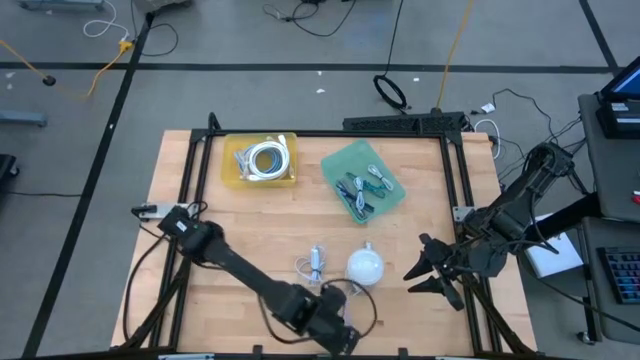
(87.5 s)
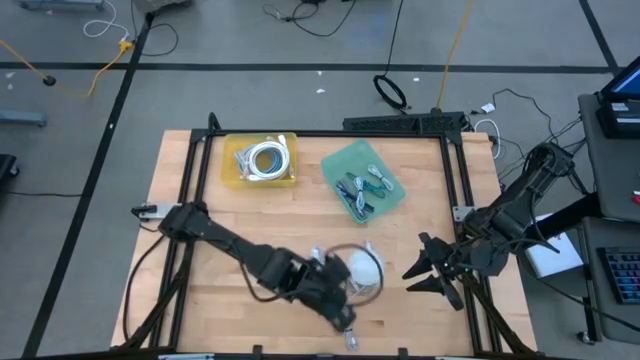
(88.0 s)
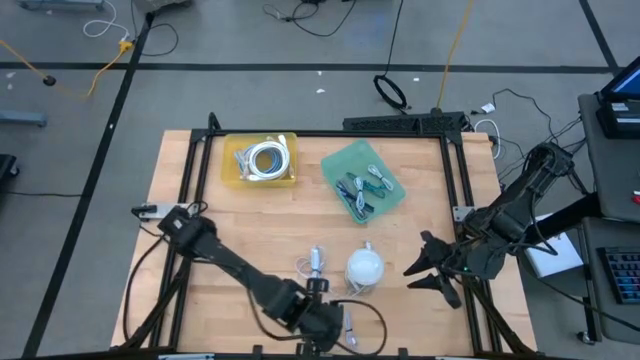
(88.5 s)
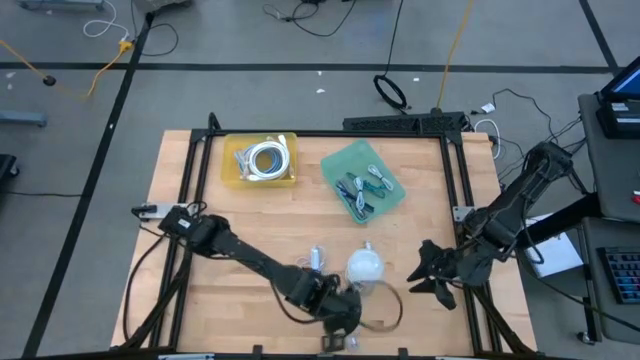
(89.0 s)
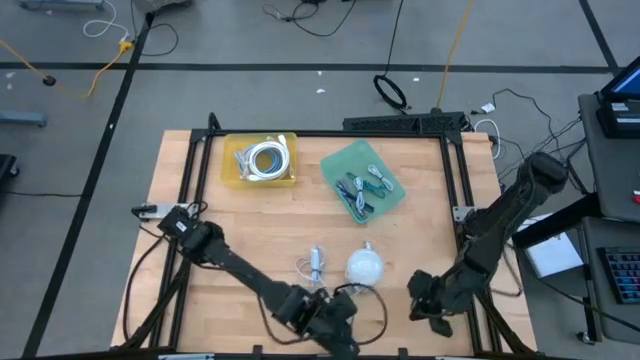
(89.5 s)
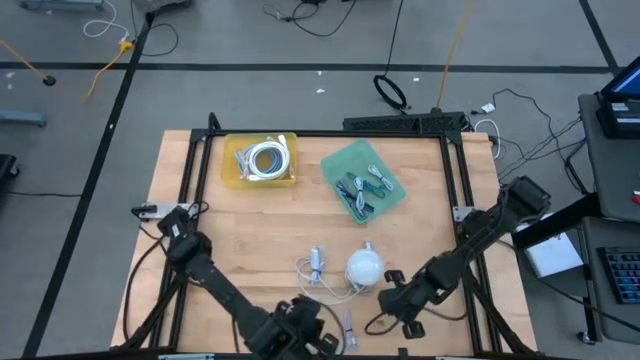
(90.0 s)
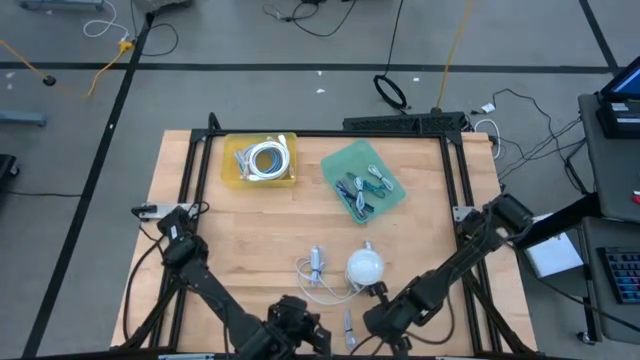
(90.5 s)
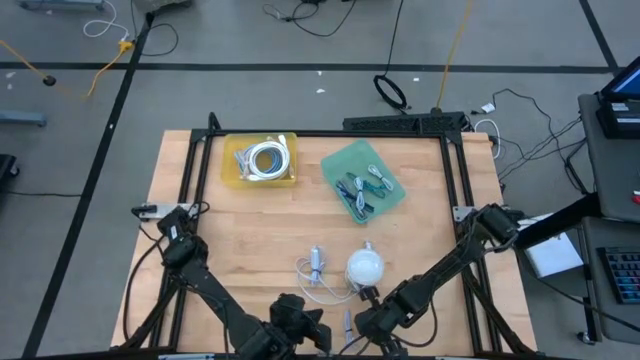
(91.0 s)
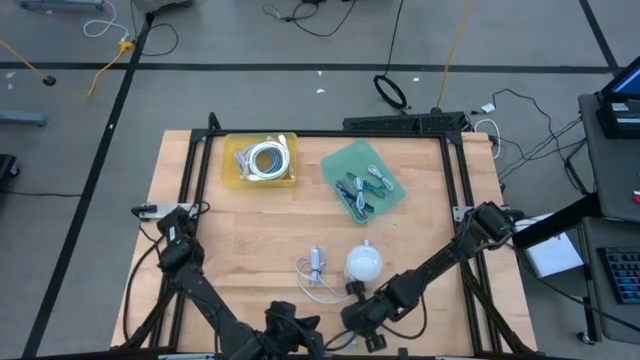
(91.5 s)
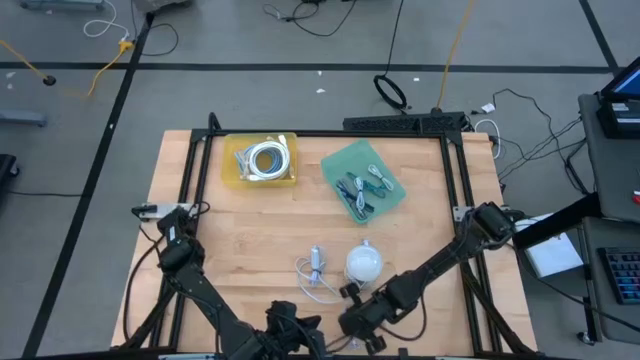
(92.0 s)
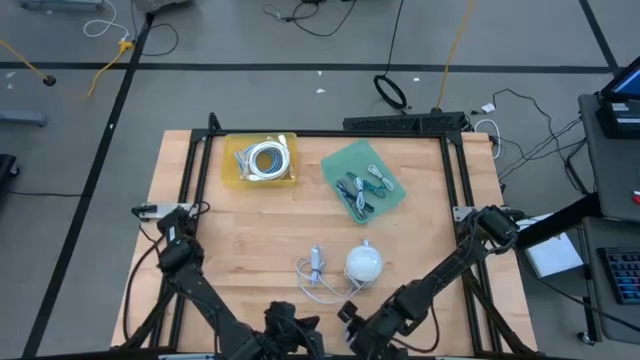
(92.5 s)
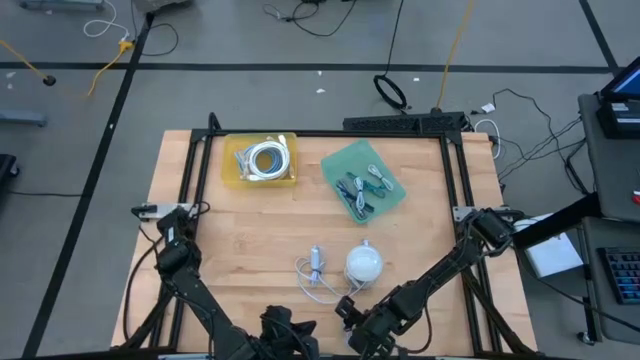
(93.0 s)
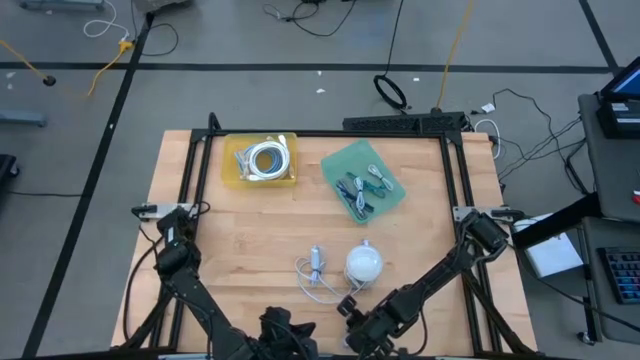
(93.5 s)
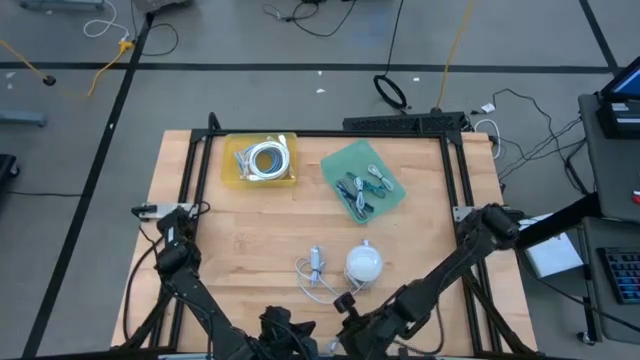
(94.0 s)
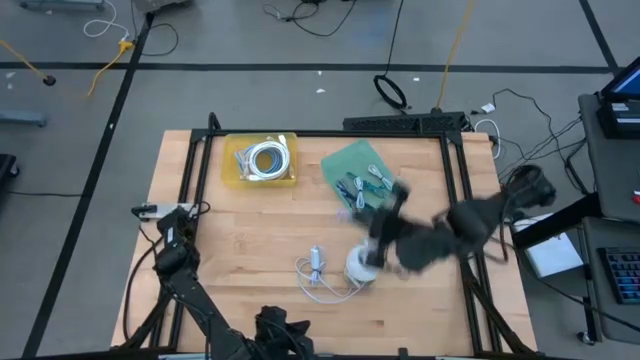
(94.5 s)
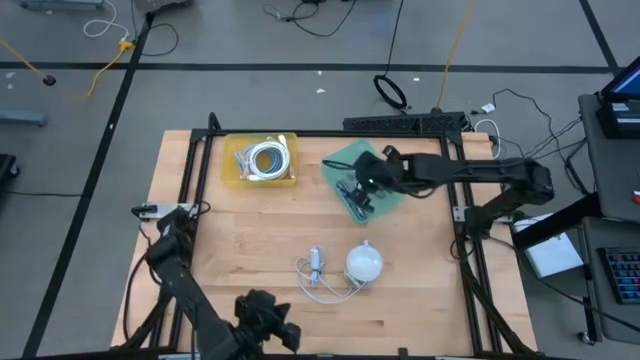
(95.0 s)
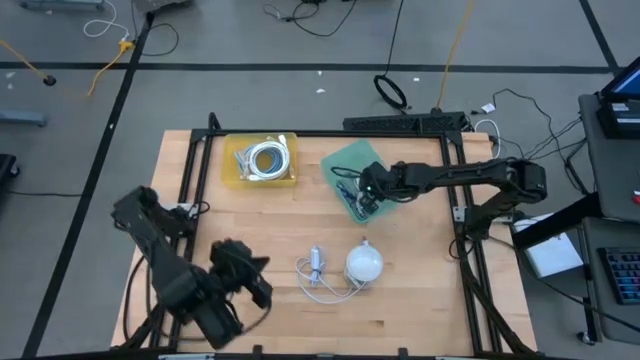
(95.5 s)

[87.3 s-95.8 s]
Task: Pick & Place USB Port
Put the purple charger cable into the green bin

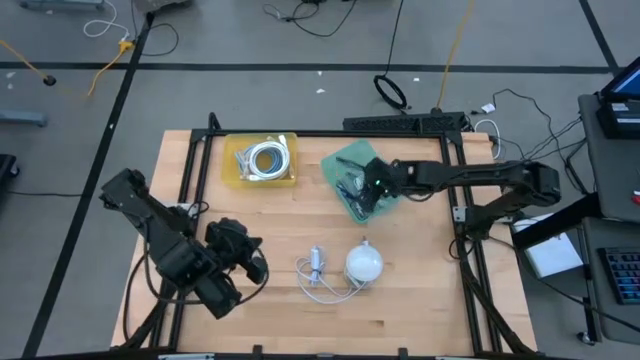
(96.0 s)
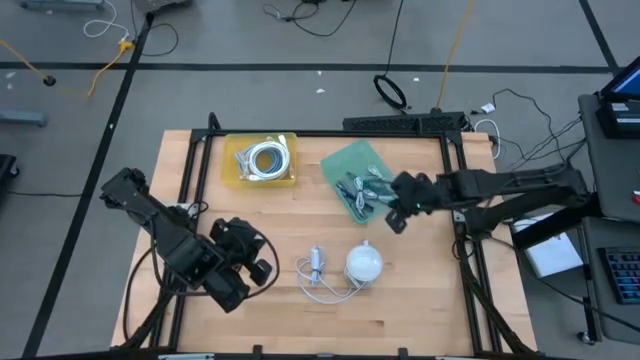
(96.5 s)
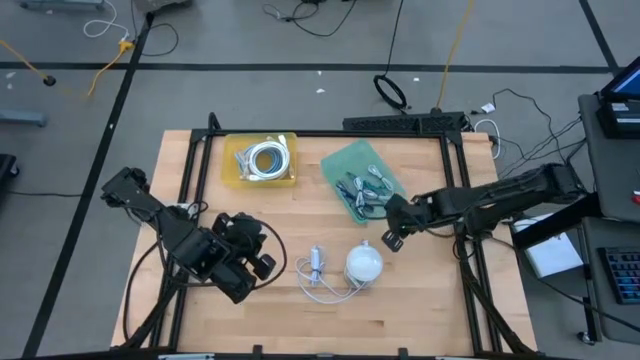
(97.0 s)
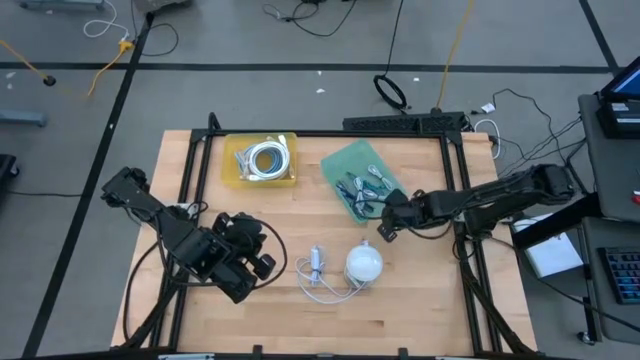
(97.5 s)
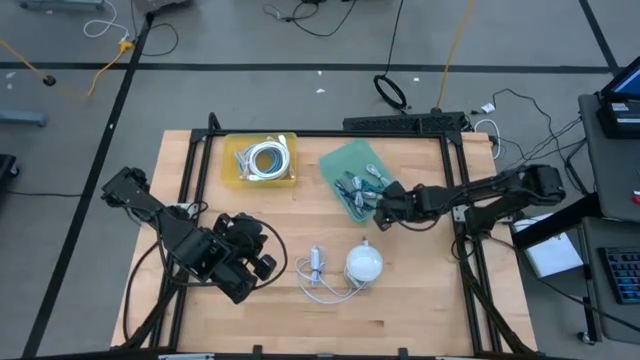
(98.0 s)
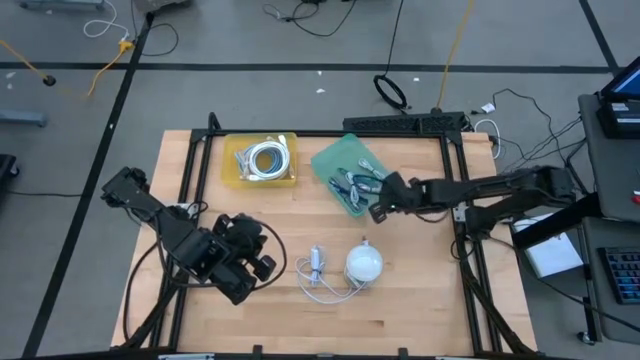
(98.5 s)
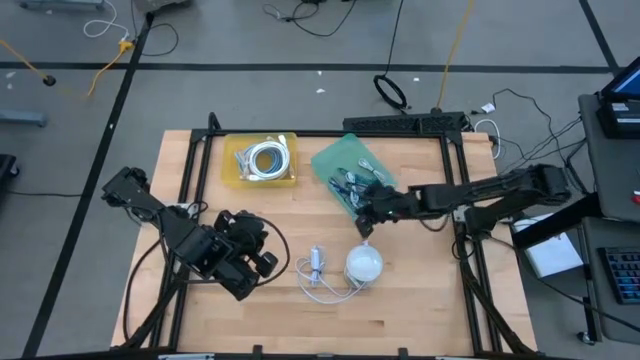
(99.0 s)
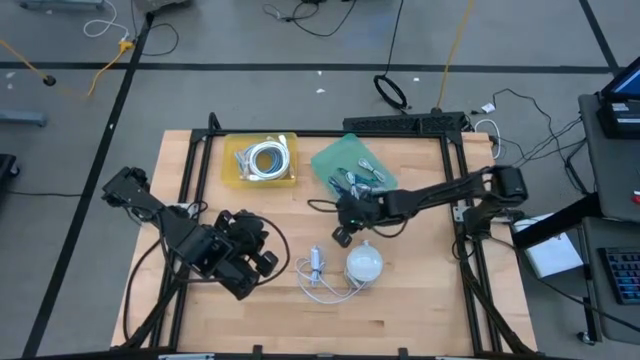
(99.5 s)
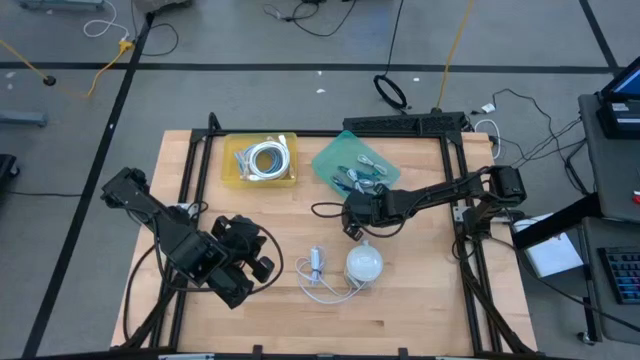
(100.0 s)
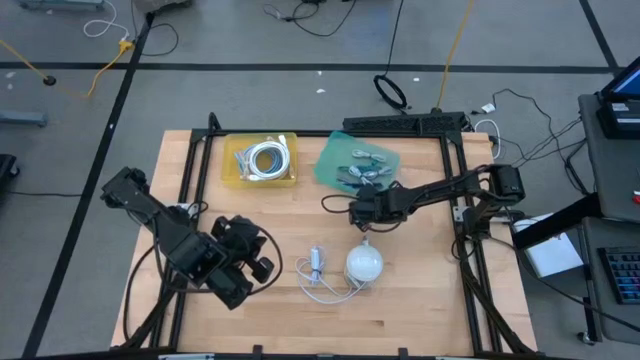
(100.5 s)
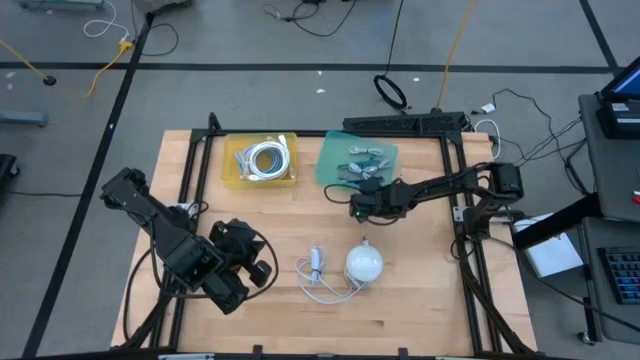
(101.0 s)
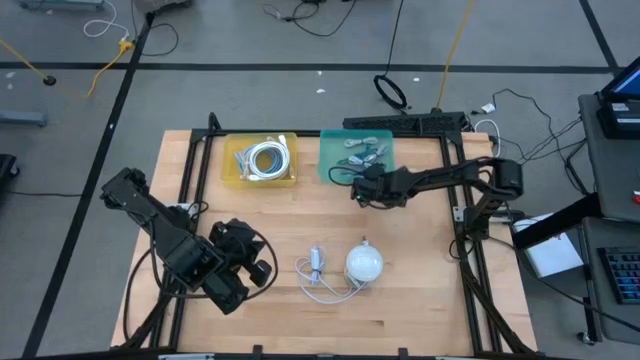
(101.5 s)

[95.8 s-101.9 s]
Adjust the green bin

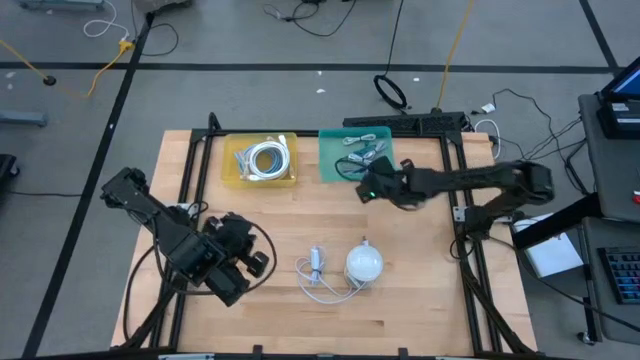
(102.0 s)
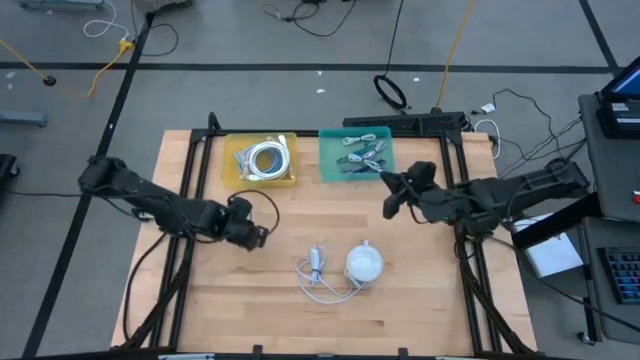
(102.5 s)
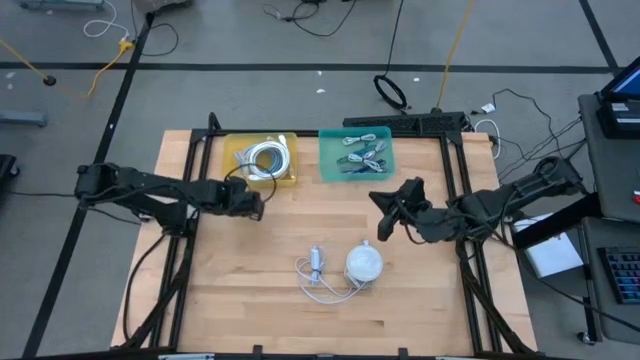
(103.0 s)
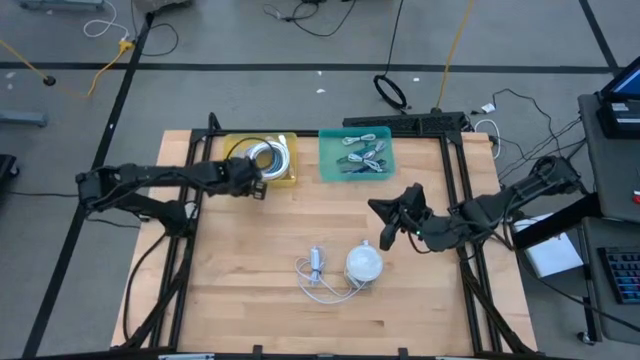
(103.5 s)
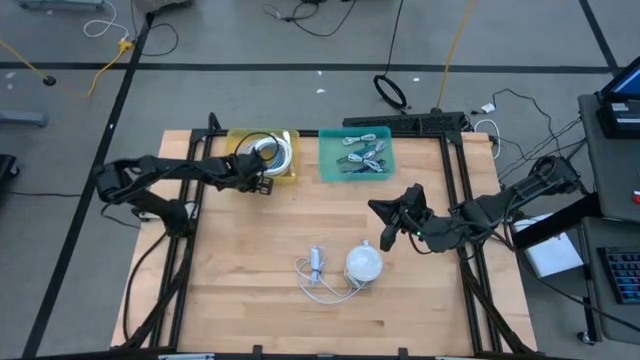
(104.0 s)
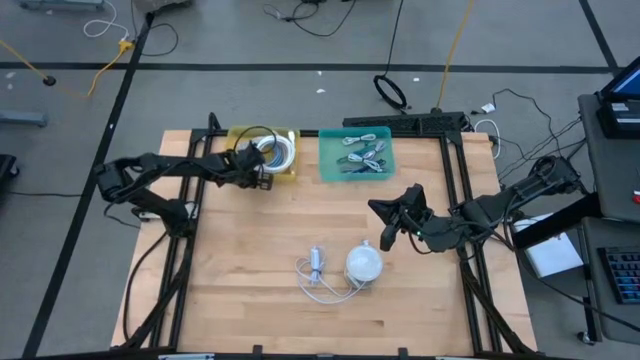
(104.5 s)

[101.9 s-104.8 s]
Adjust the yellow bin

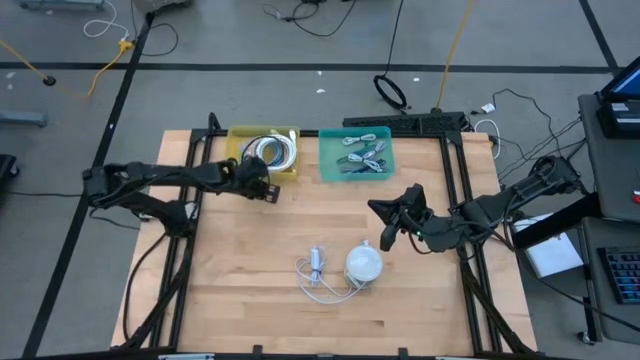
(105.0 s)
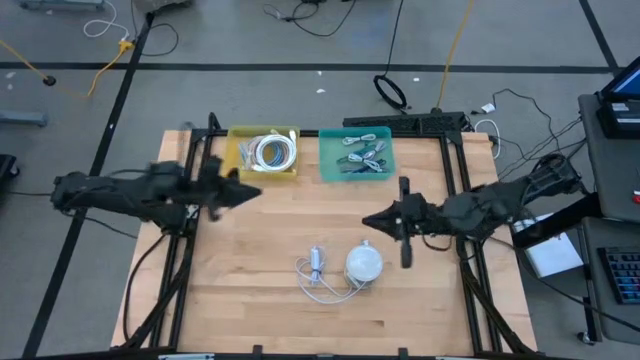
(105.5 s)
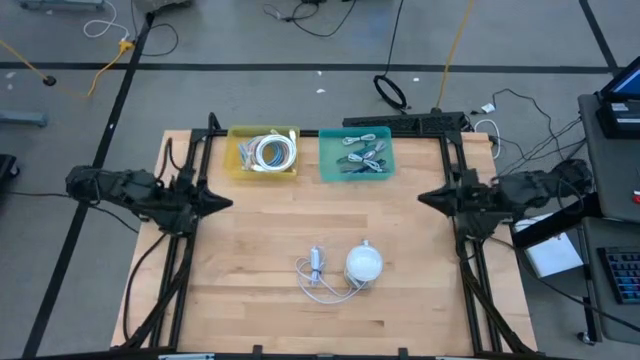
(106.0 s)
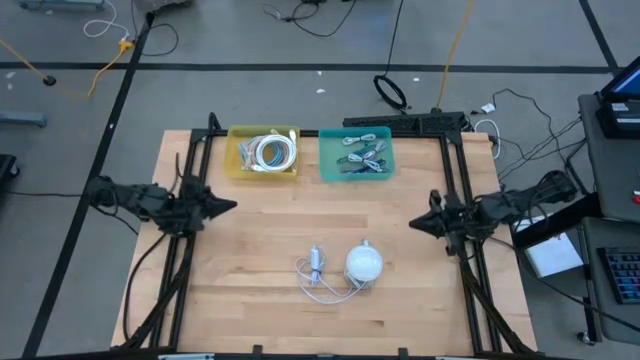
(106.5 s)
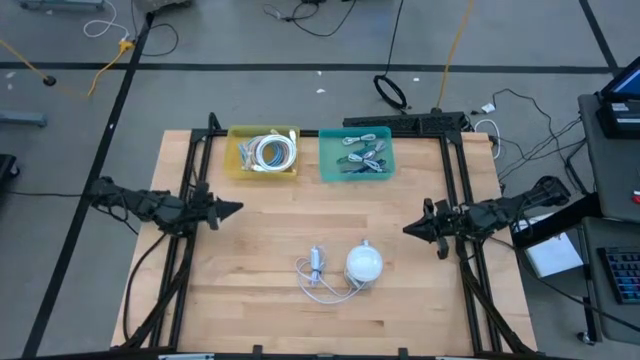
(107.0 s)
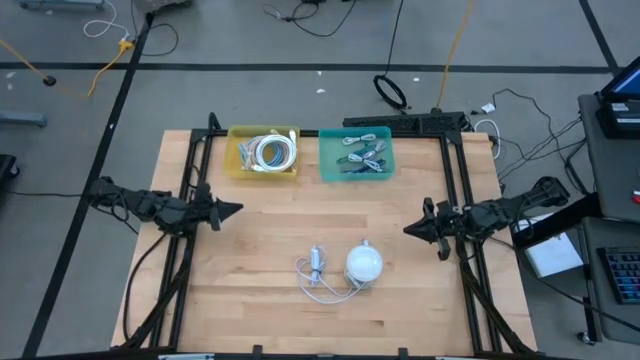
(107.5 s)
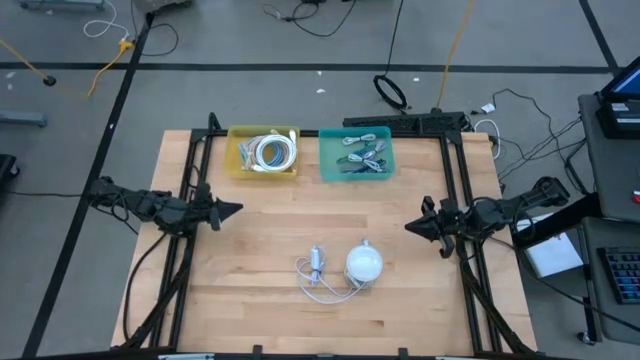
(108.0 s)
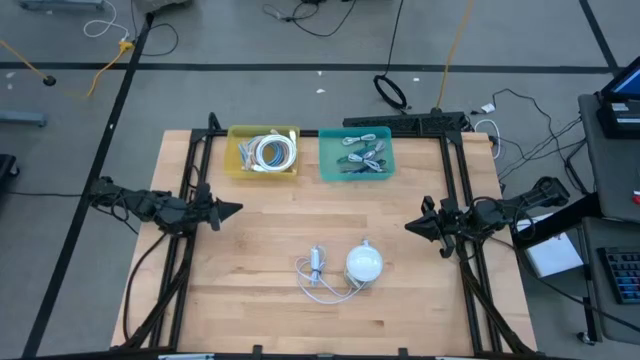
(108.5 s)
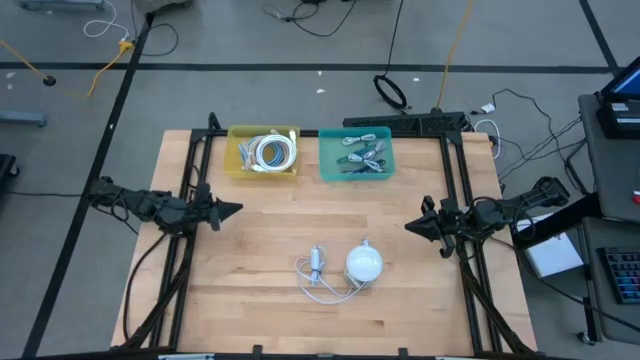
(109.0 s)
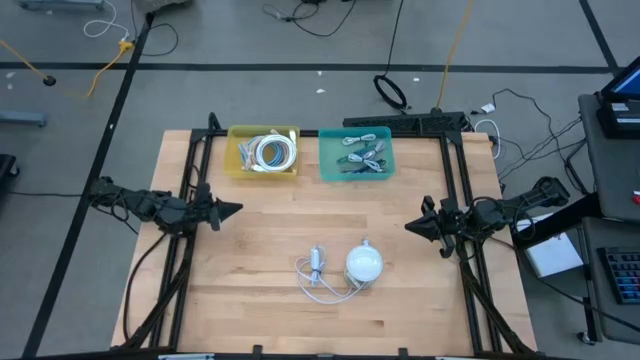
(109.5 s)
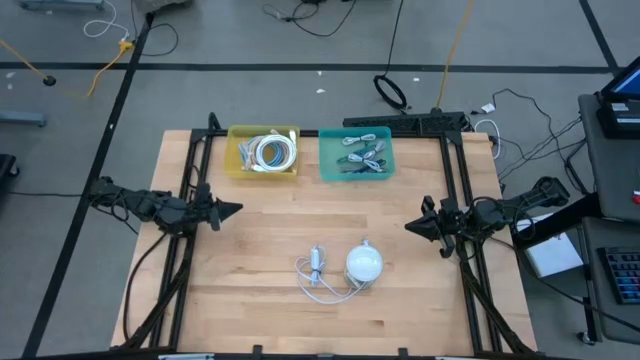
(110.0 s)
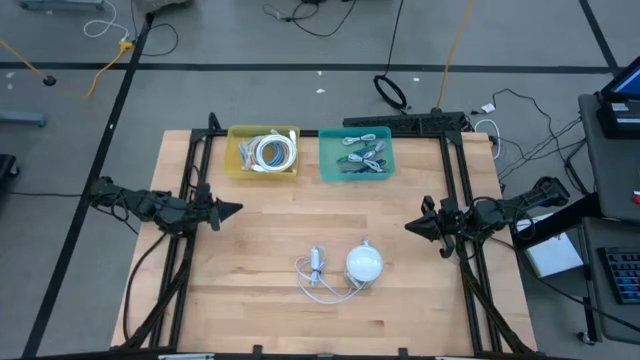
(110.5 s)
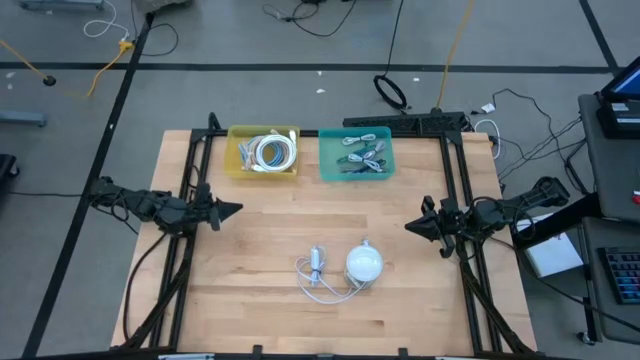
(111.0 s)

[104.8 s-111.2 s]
Return to Home Position
